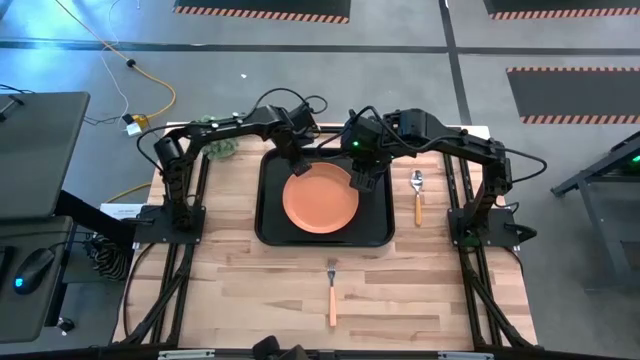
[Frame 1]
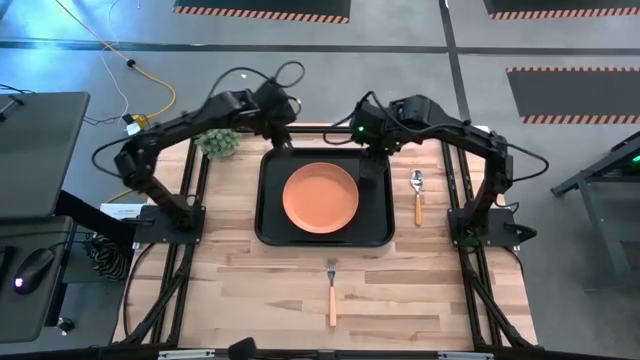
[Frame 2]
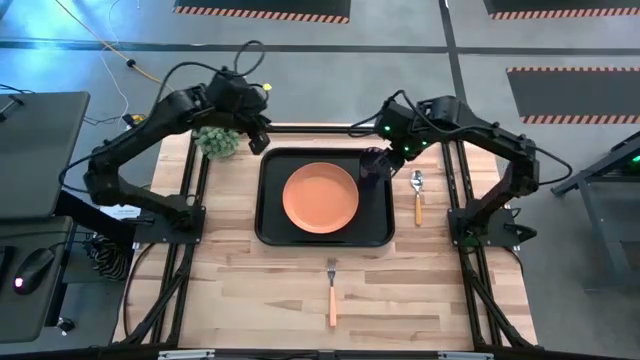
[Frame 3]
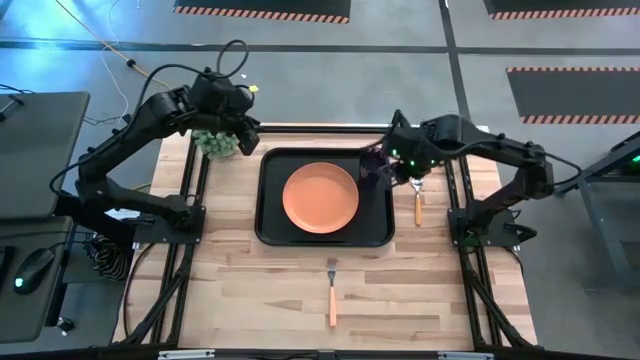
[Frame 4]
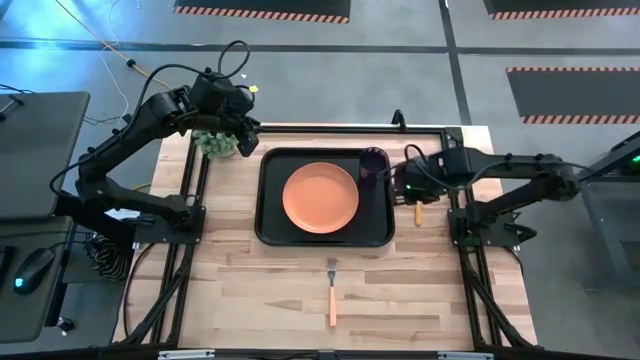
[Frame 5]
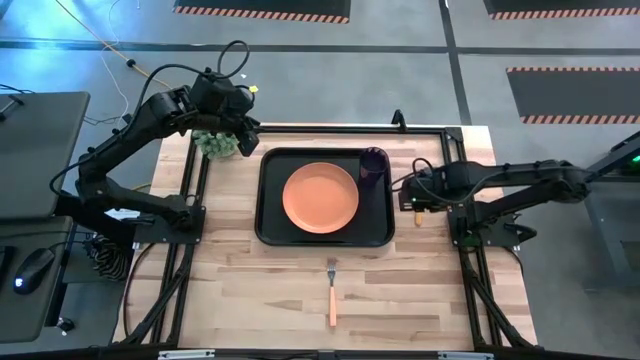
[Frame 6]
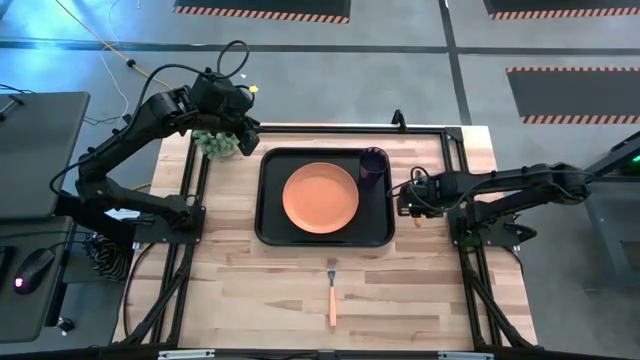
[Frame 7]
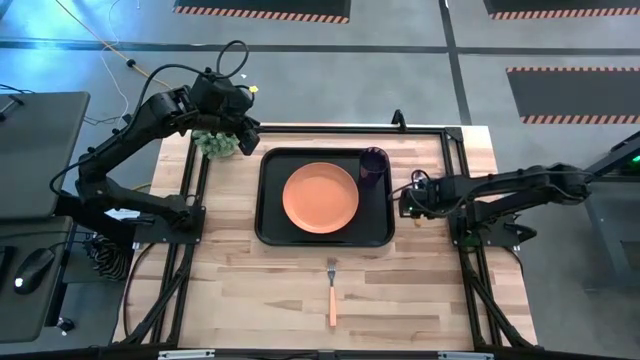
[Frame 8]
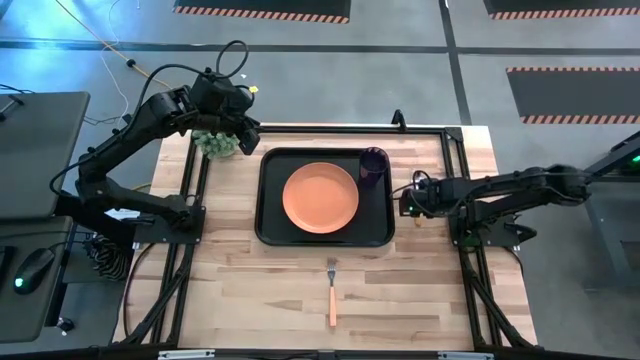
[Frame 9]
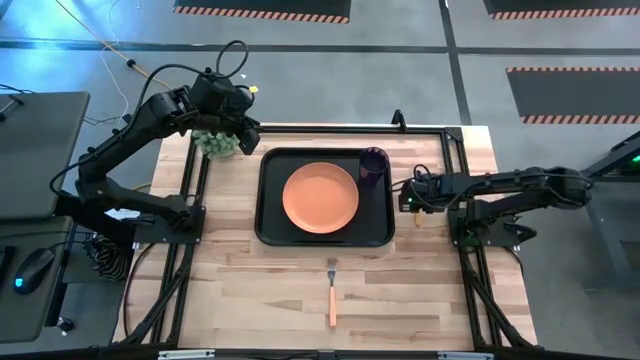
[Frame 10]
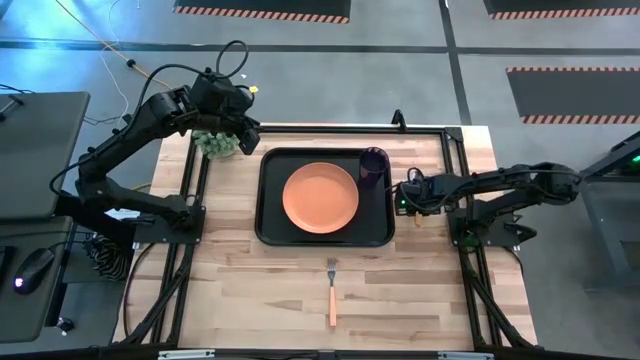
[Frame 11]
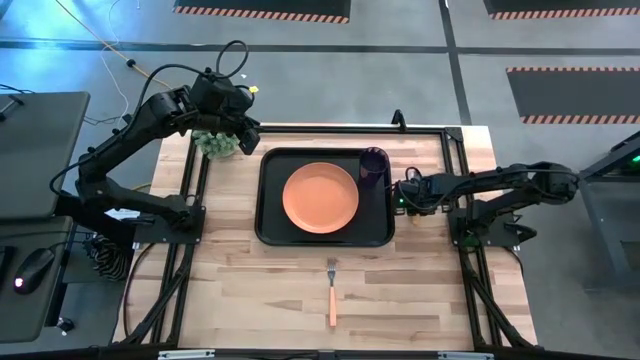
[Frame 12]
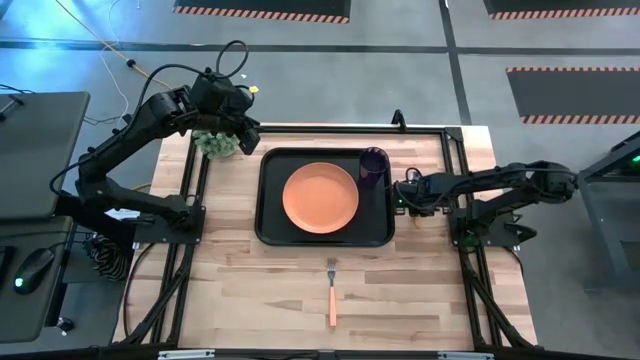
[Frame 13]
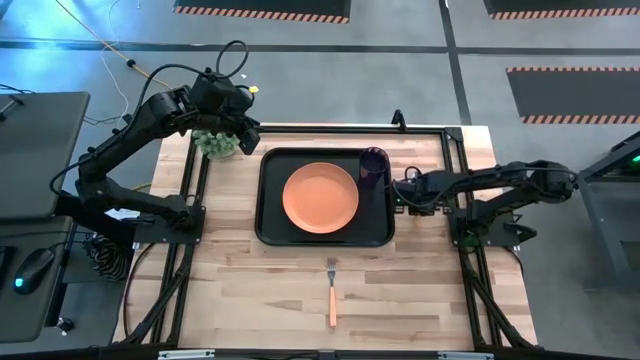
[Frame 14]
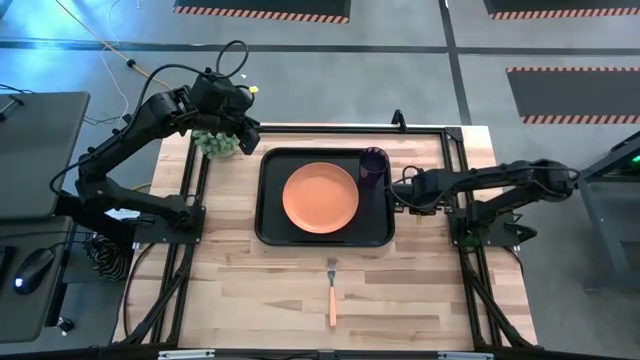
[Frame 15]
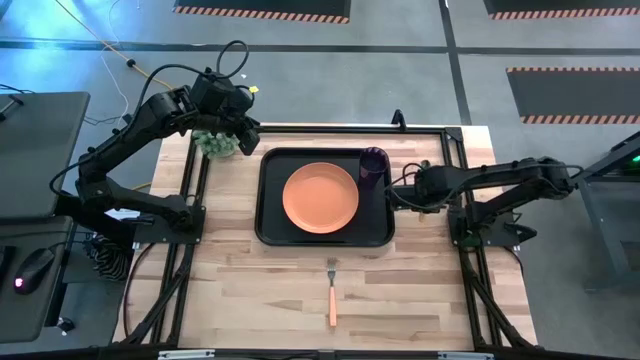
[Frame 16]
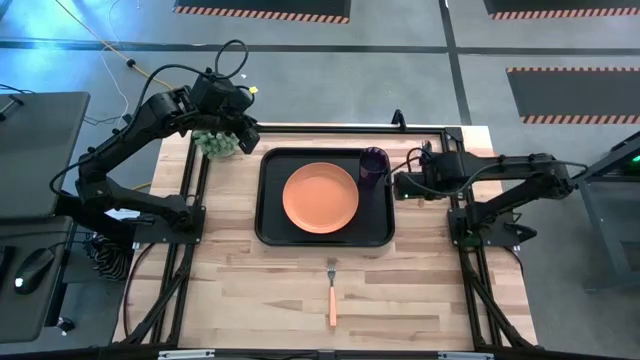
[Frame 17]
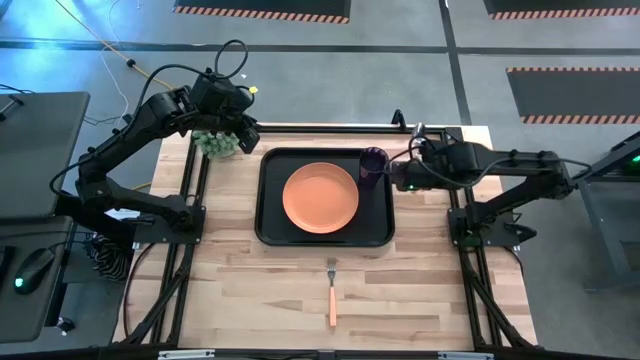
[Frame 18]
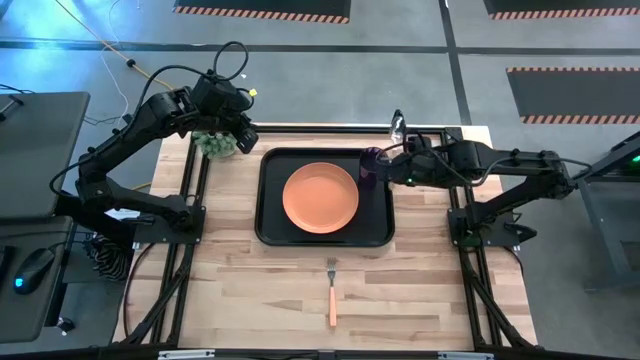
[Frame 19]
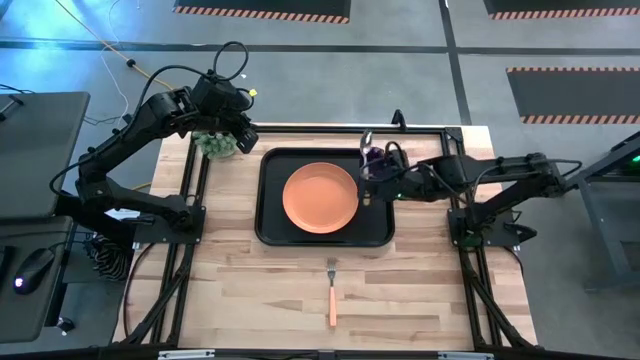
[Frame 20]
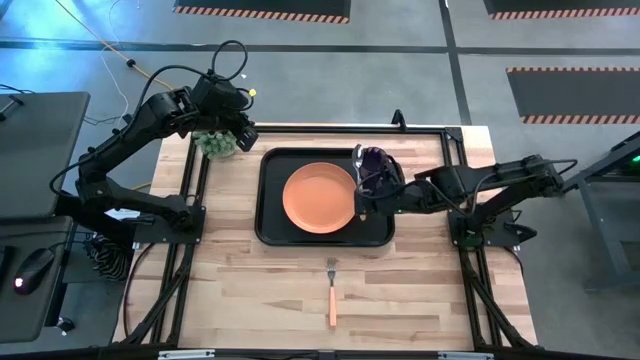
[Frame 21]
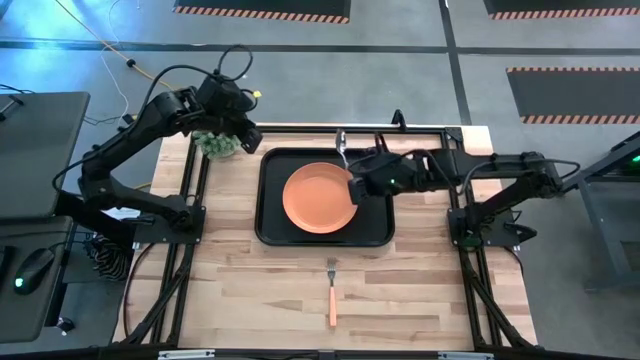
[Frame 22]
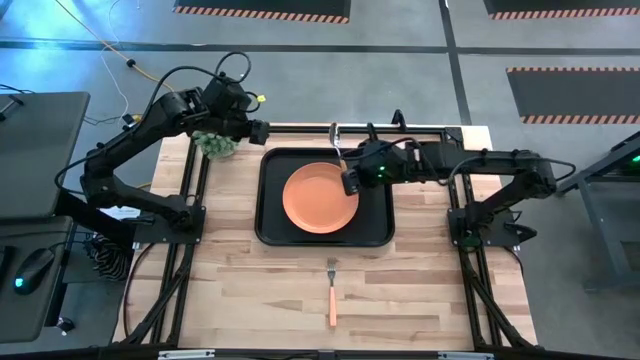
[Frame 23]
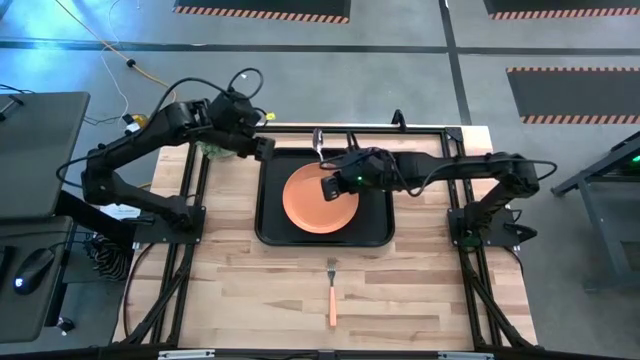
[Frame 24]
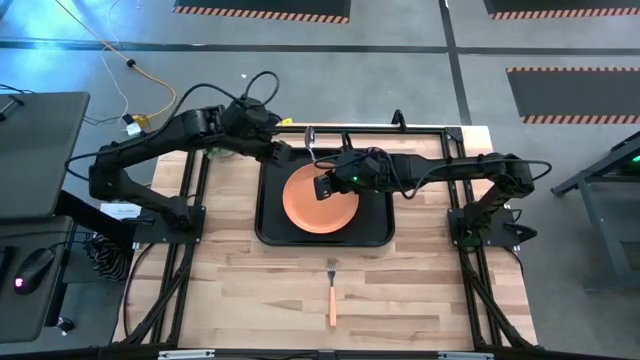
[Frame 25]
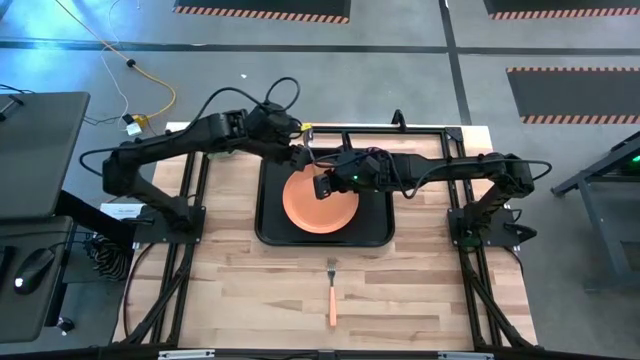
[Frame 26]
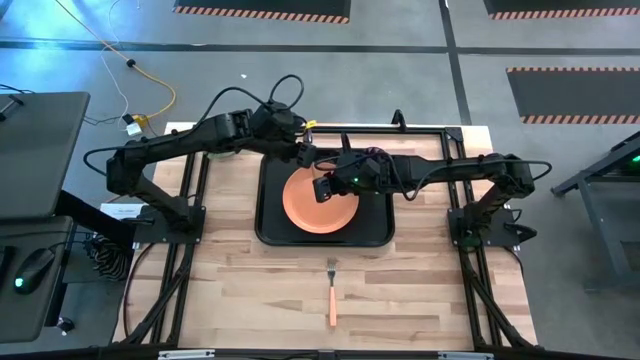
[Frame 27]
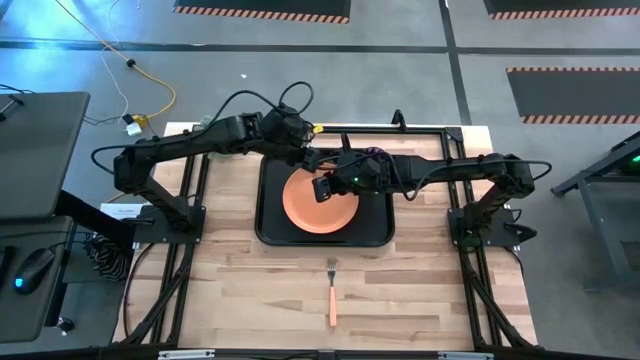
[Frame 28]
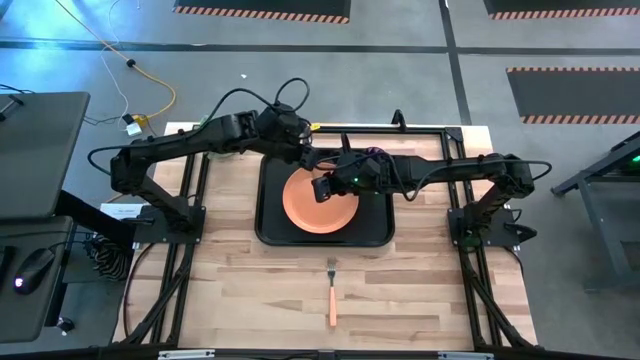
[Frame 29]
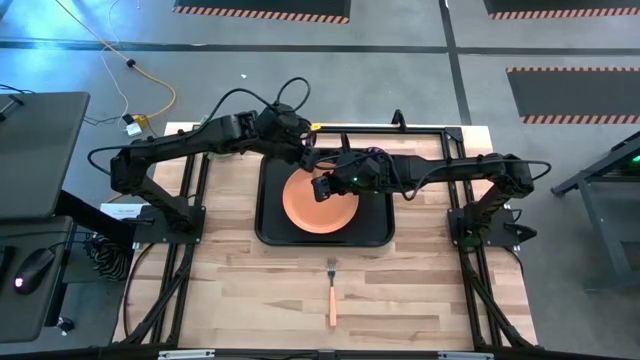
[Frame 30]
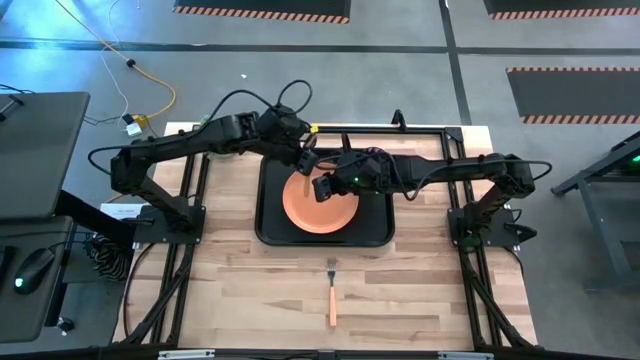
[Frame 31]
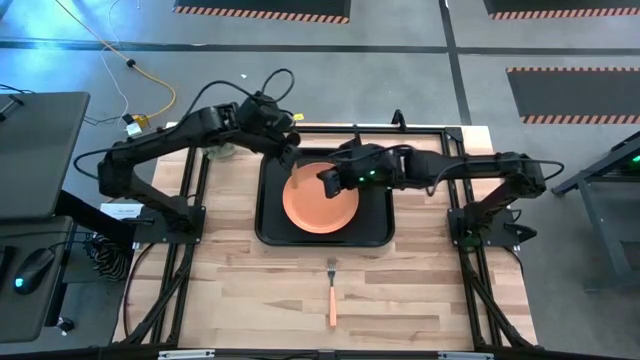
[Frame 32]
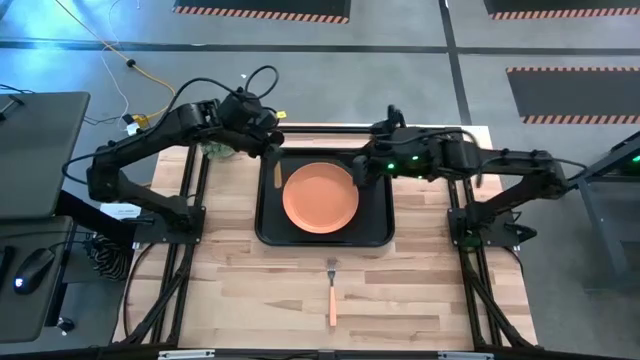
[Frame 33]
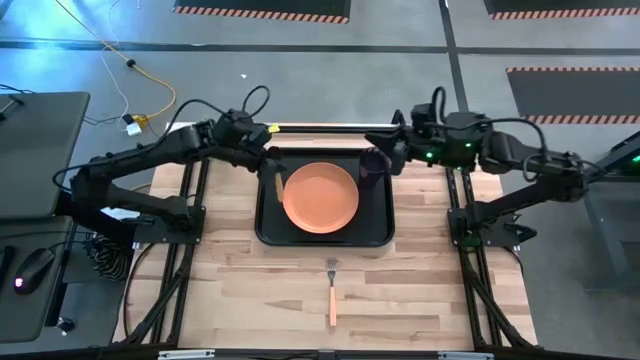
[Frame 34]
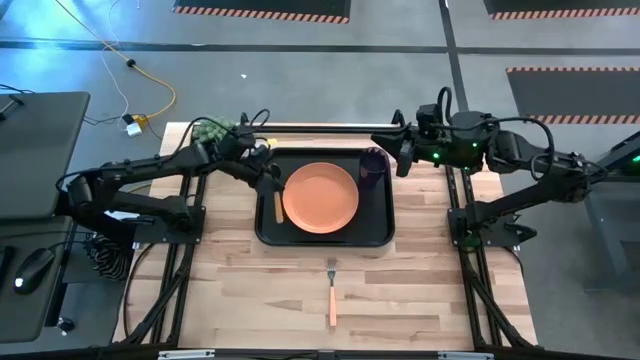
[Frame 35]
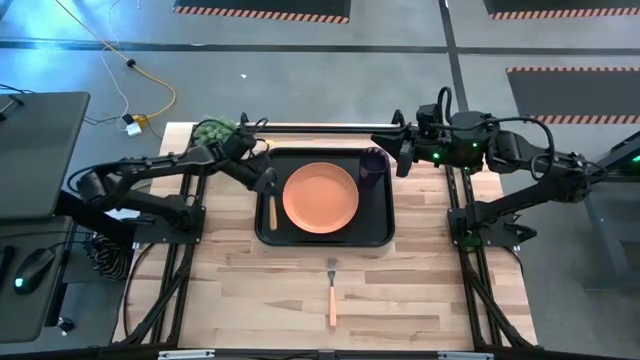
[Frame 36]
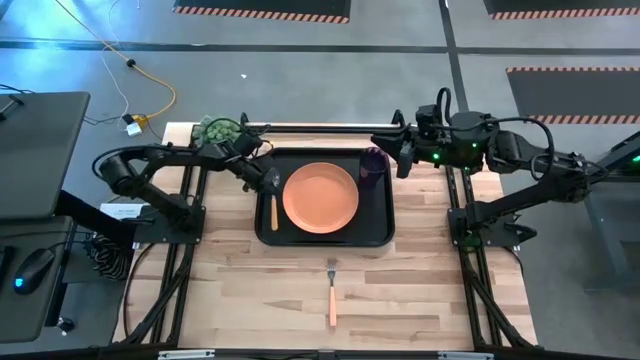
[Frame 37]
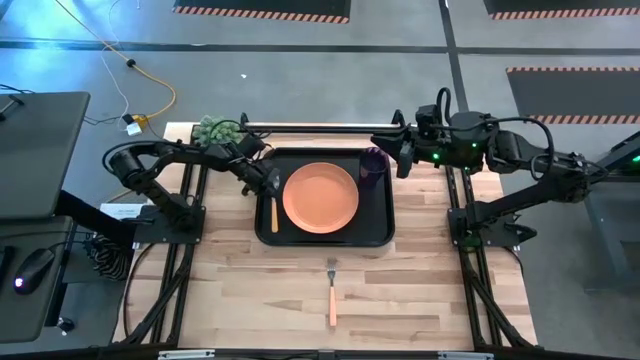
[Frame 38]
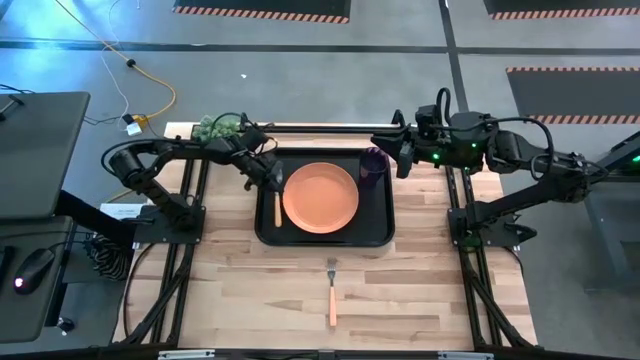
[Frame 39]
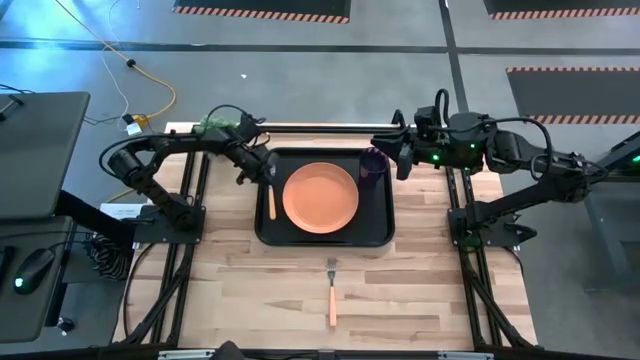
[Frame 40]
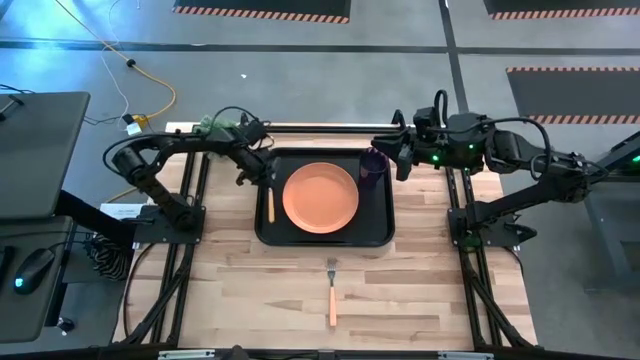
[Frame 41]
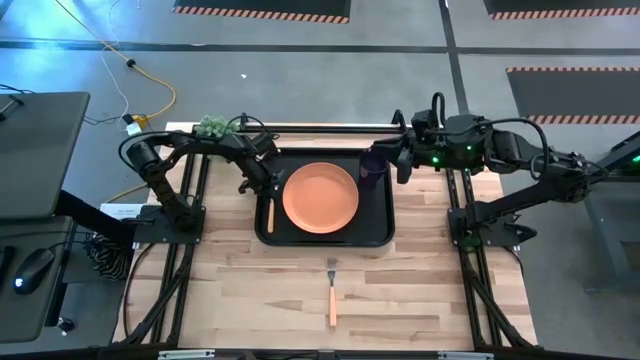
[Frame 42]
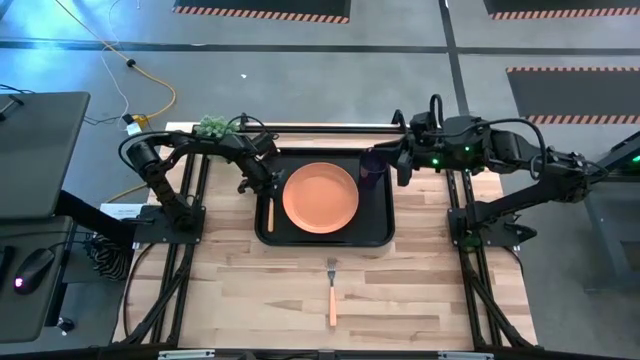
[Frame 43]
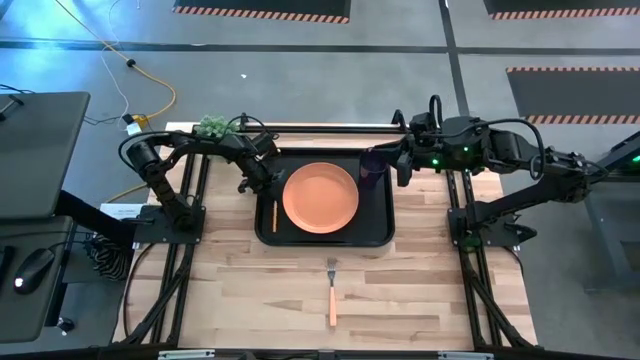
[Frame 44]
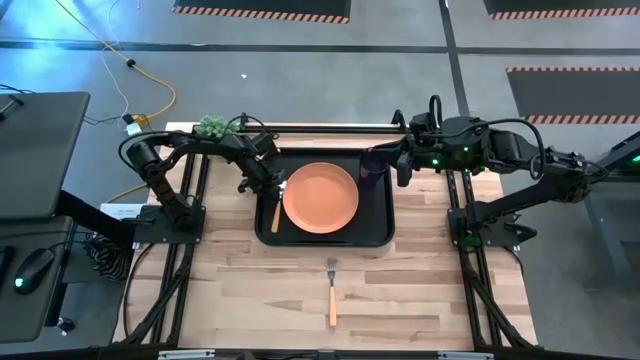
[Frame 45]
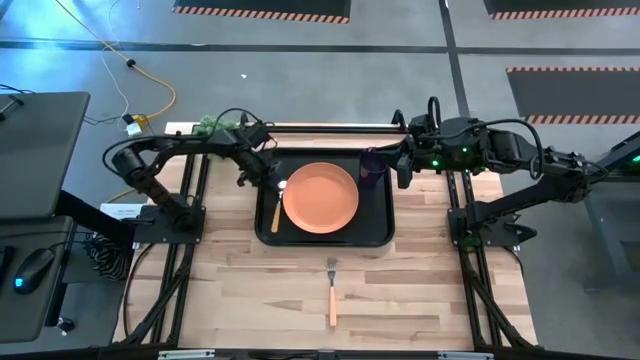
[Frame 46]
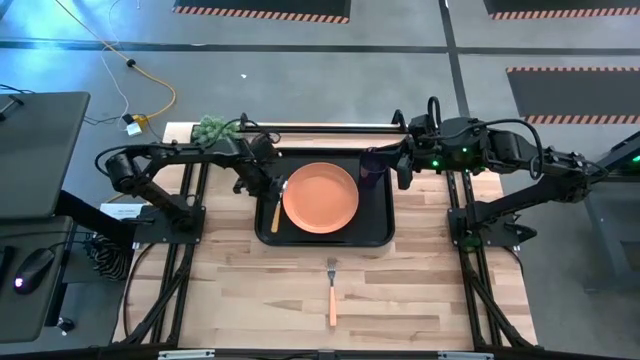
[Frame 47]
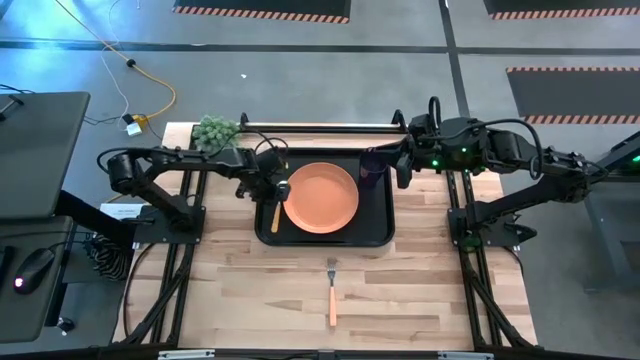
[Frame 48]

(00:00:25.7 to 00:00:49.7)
Task: Pick and place plate/cup/fork/spoon on tray
Put the yellow spoon to the left side of the orange plate on the black serving tray
